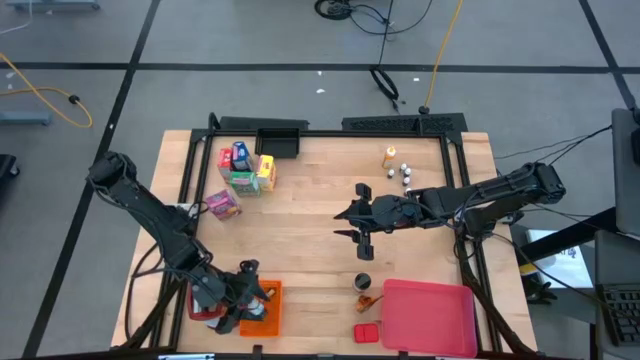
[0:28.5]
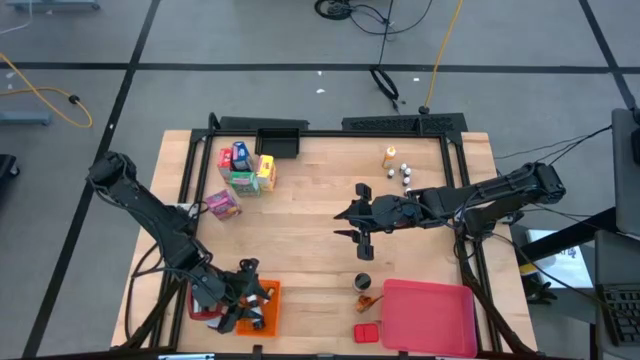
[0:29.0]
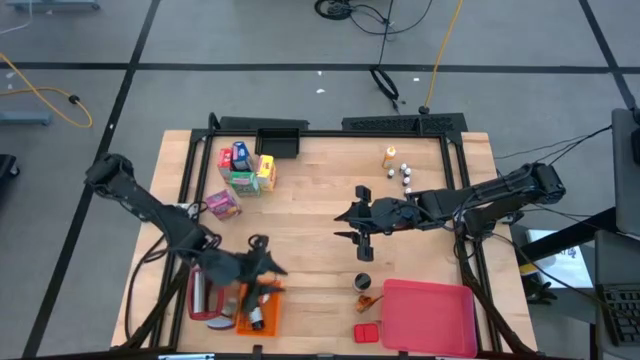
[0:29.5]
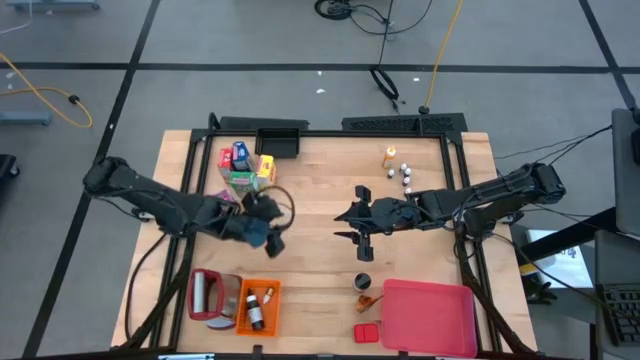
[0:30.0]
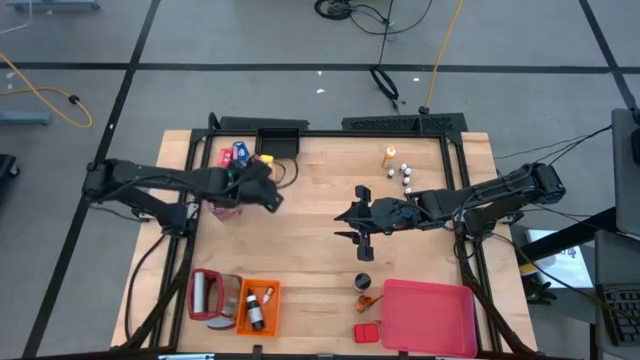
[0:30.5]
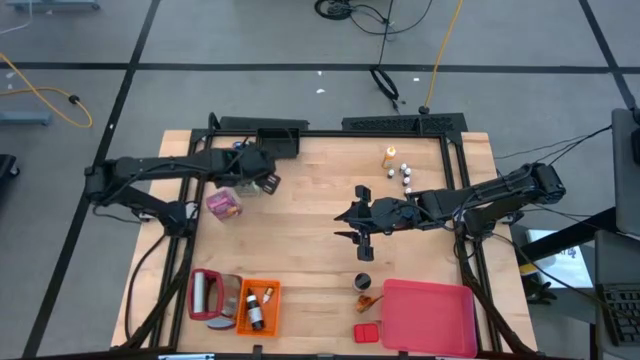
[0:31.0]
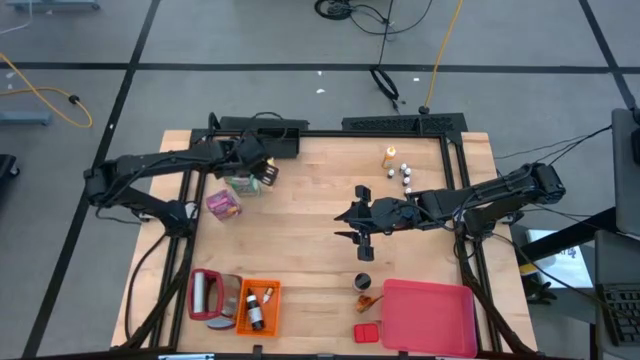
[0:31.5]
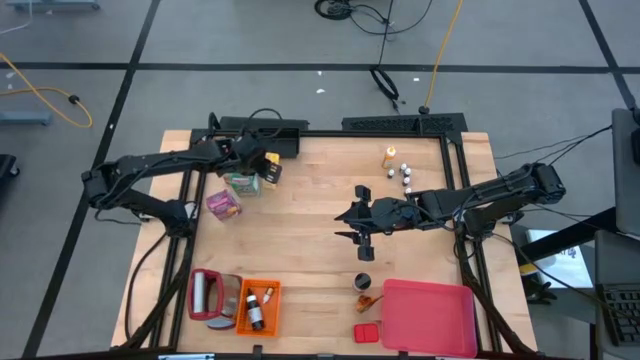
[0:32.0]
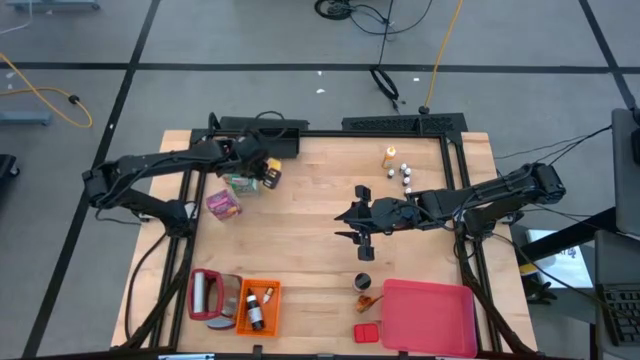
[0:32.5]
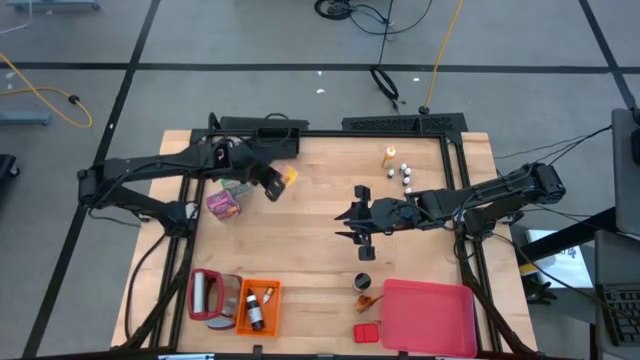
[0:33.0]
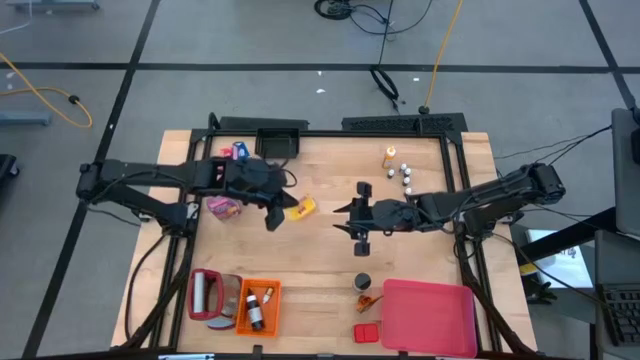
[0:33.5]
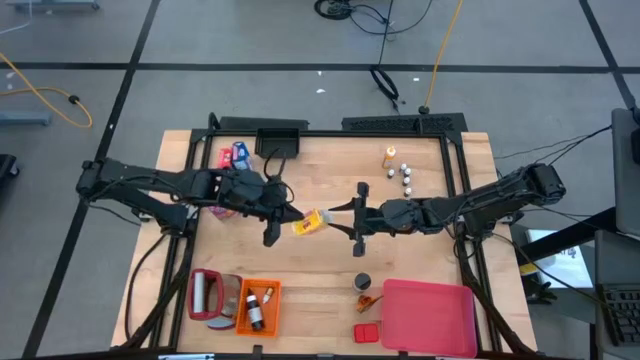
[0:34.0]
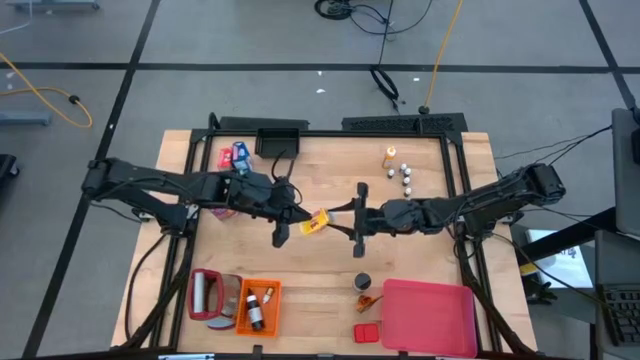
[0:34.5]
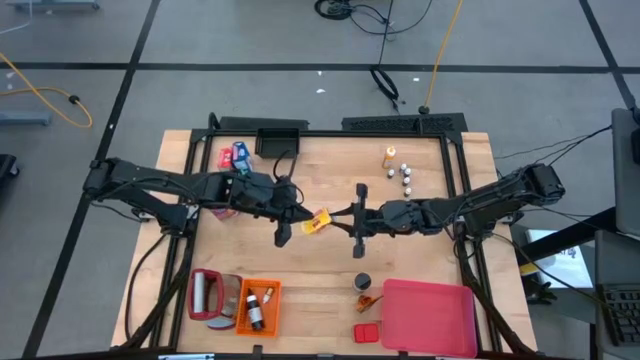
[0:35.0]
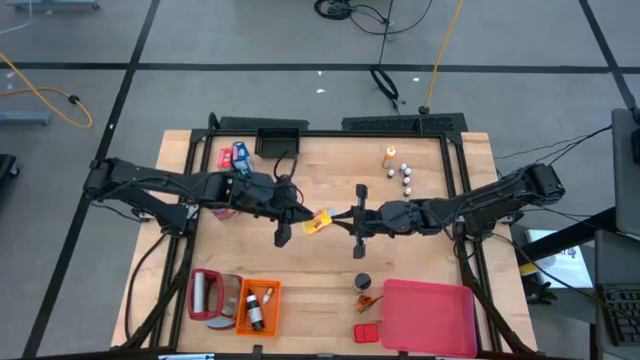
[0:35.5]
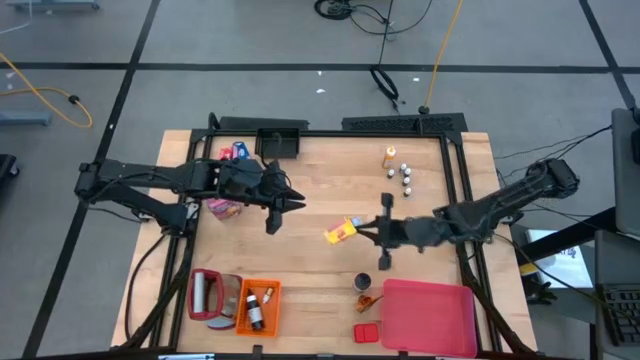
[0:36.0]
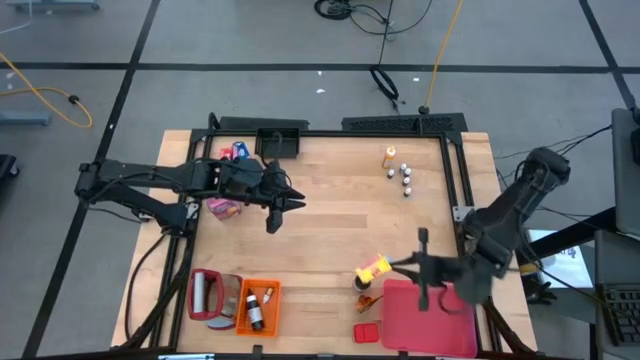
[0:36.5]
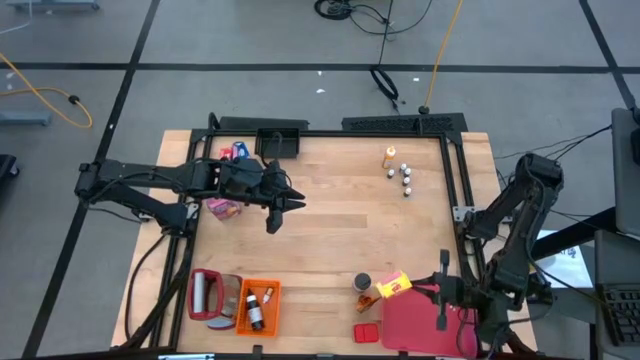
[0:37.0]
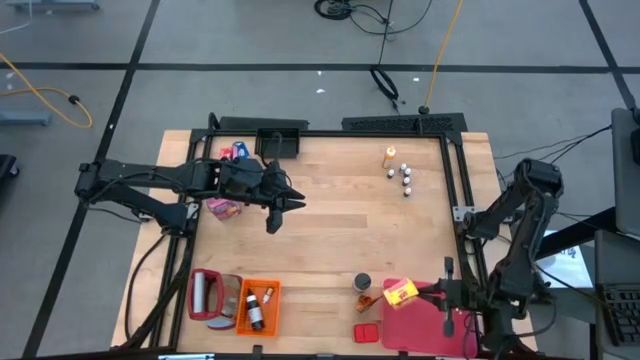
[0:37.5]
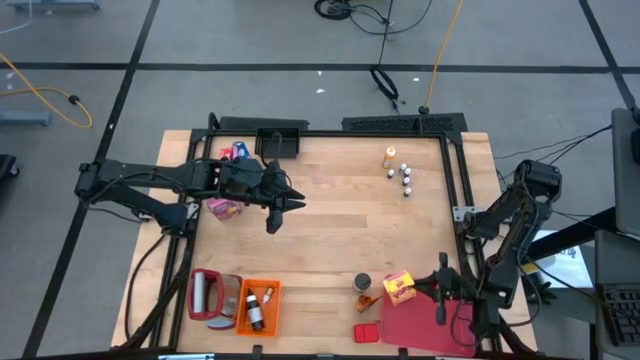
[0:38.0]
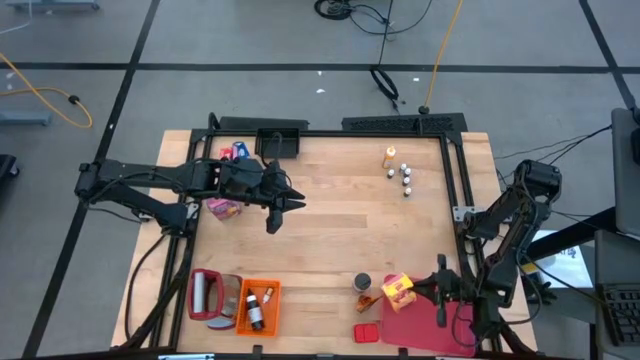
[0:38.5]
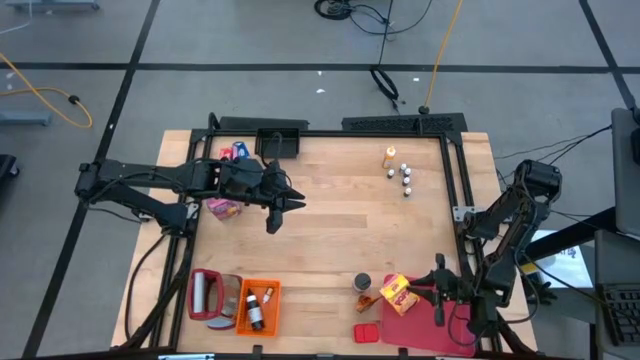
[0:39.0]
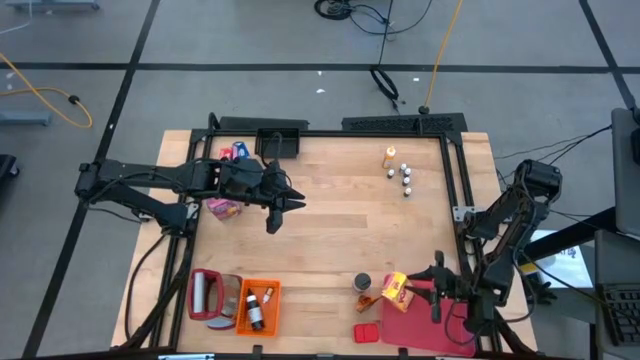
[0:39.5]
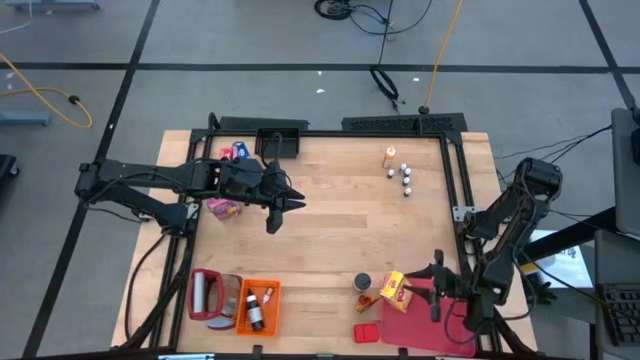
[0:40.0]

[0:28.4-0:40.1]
Task: Pick & Place Kitchen Items
Put the yellow cereal box into the red bin

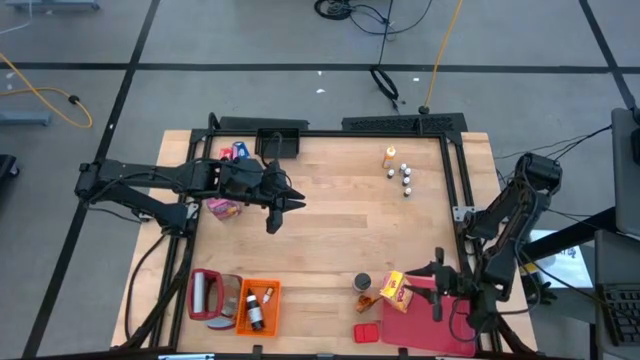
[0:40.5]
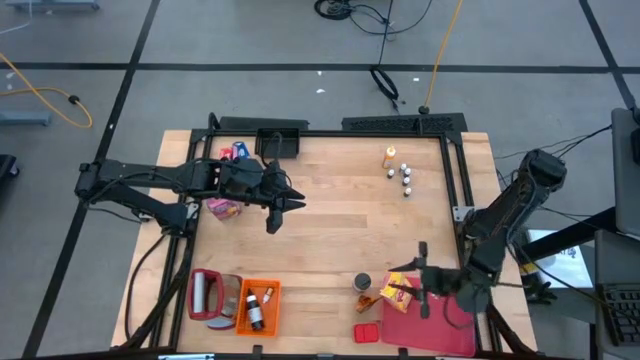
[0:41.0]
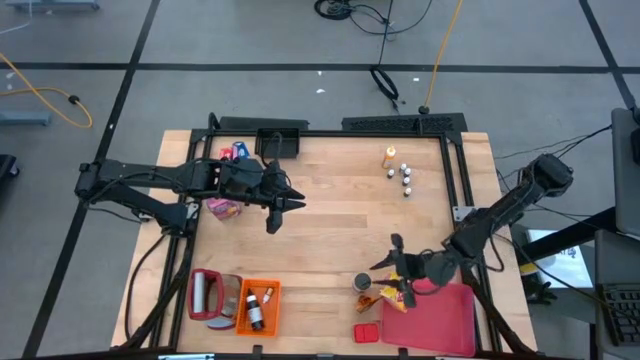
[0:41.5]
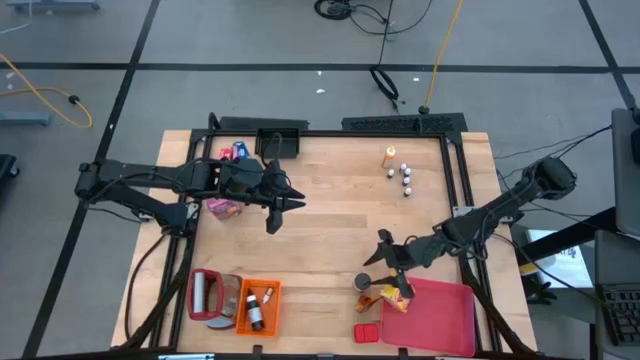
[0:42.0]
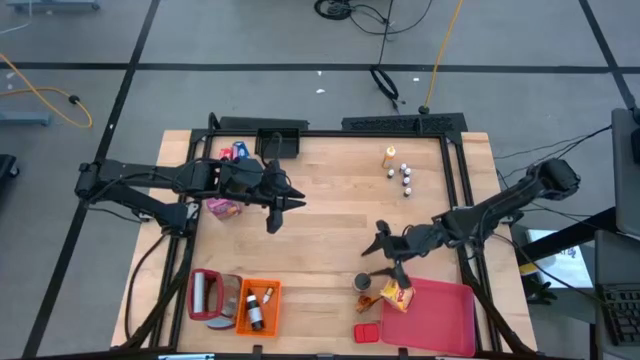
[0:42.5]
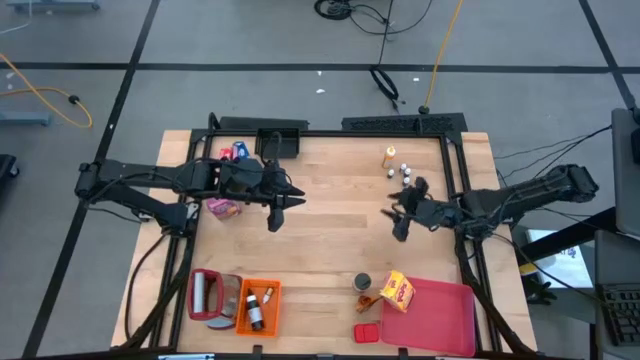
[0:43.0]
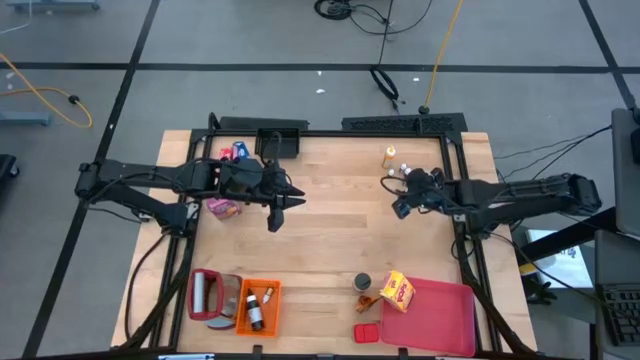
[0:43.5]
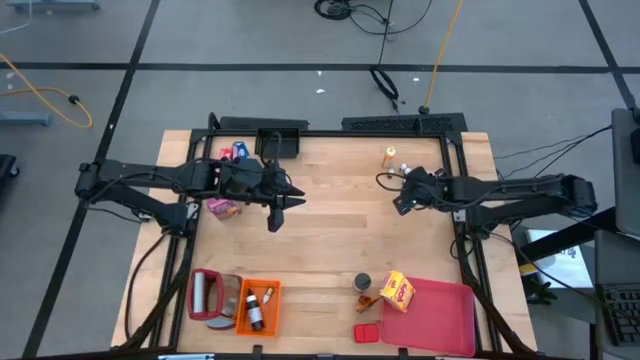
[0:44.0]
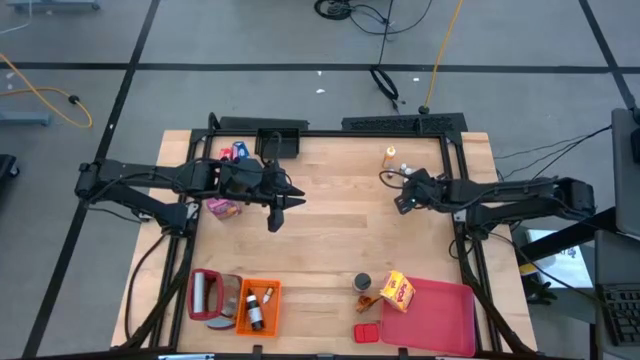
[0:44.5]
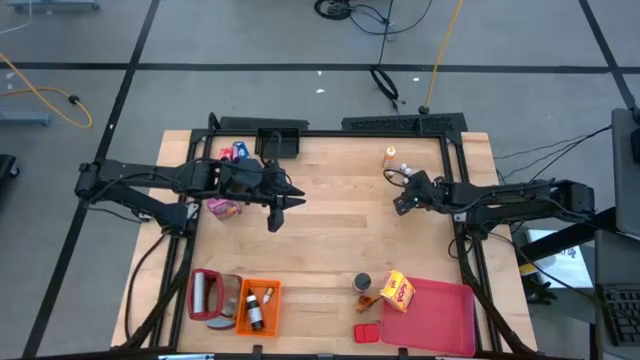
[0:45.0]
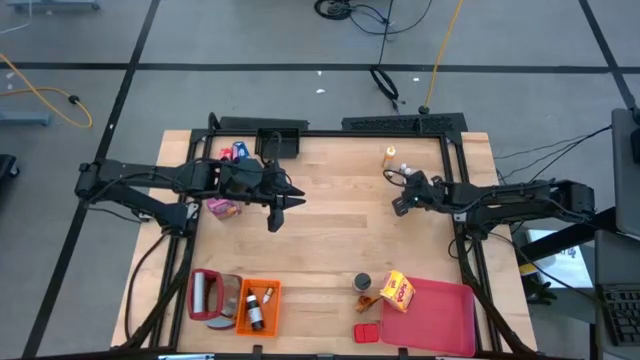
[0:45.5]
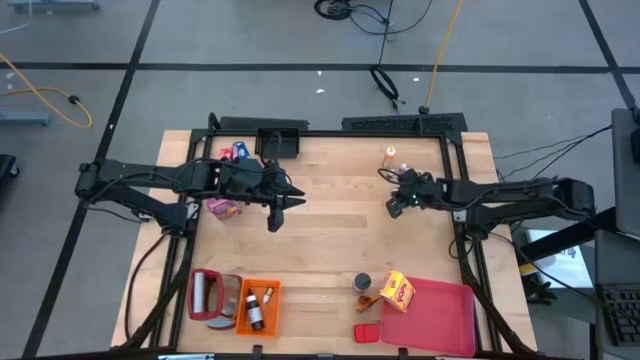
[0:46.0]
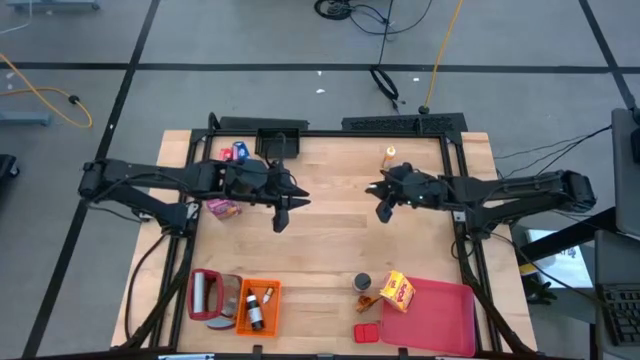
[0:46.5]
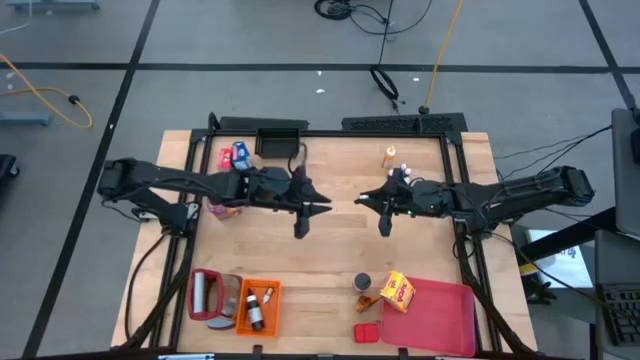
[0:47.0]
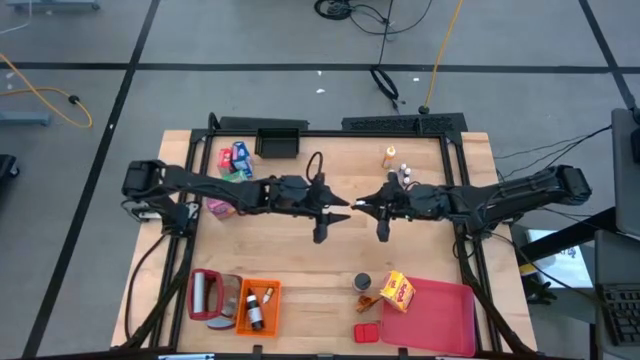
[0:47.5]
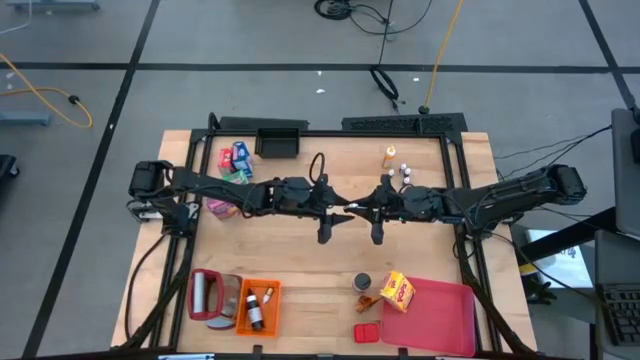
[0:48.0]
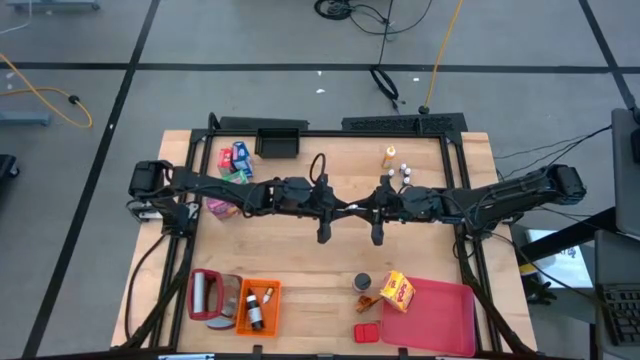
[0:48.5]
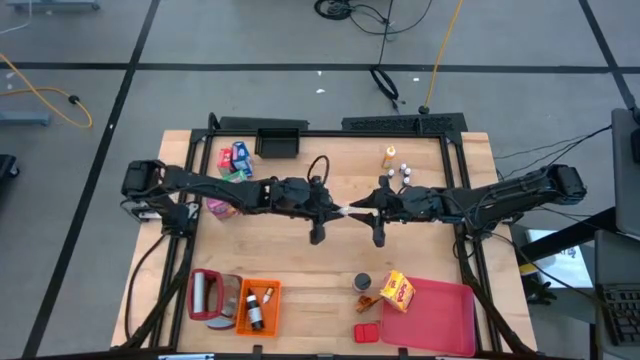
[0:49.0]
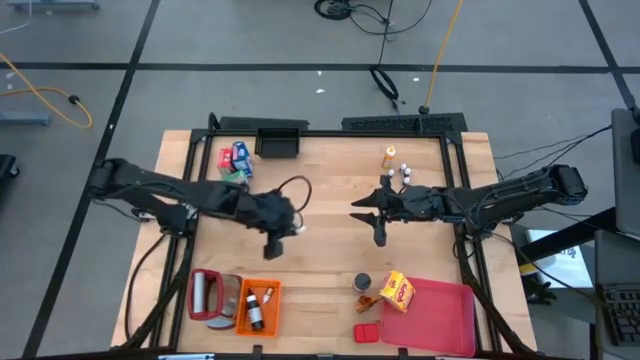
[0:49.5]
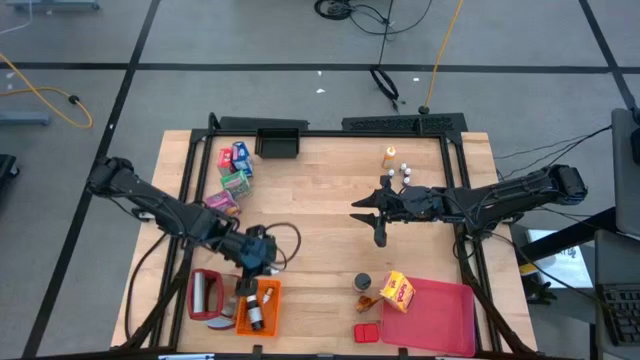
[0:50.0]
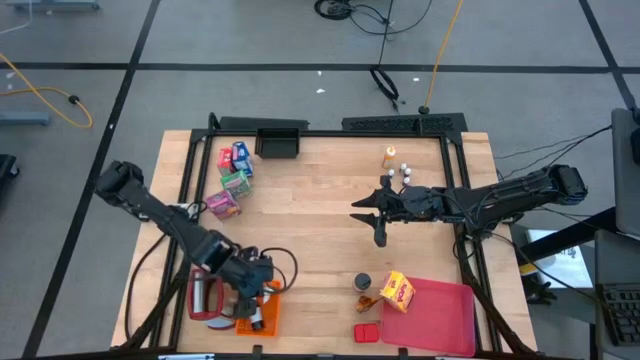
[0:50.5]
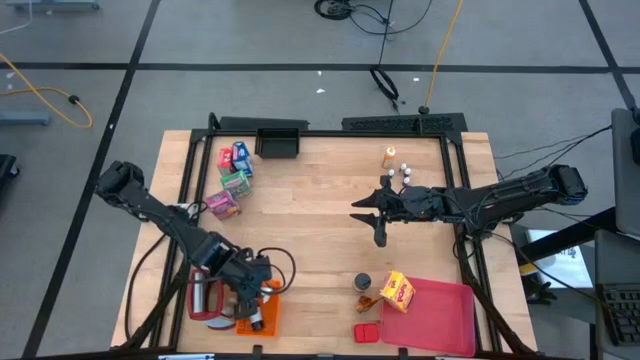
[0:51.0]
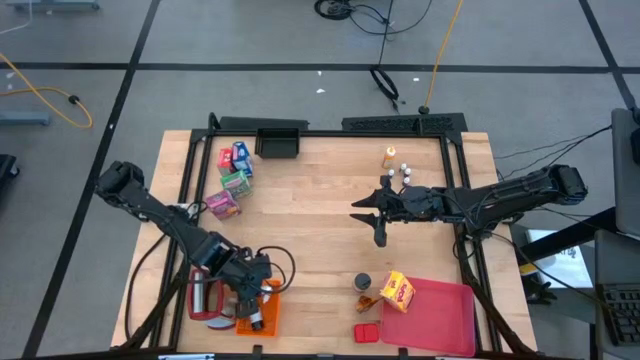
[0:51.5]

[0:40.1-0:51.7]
Put the small brown food coloring bottle into the orange bin
